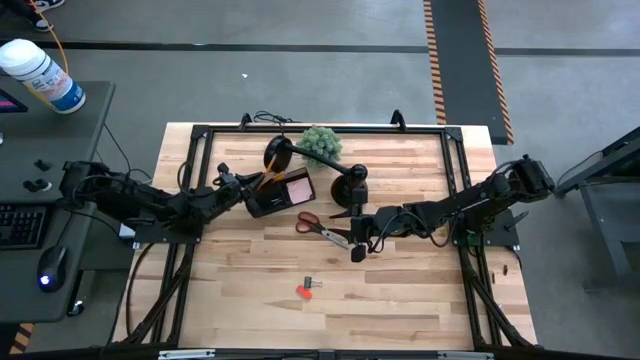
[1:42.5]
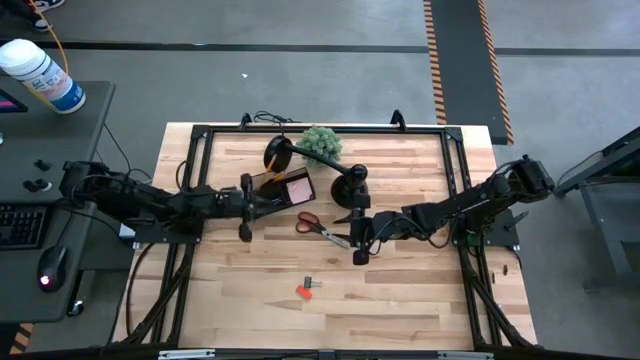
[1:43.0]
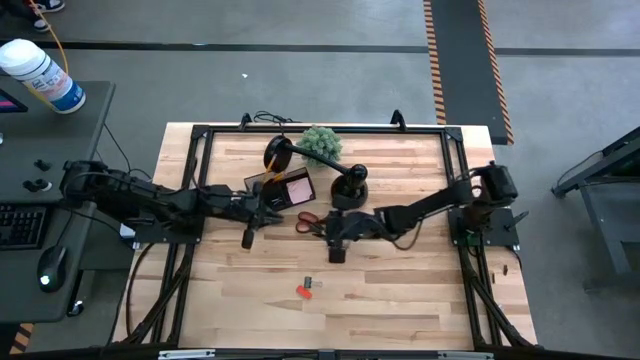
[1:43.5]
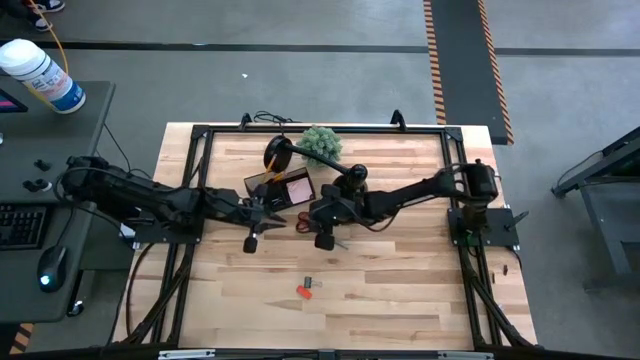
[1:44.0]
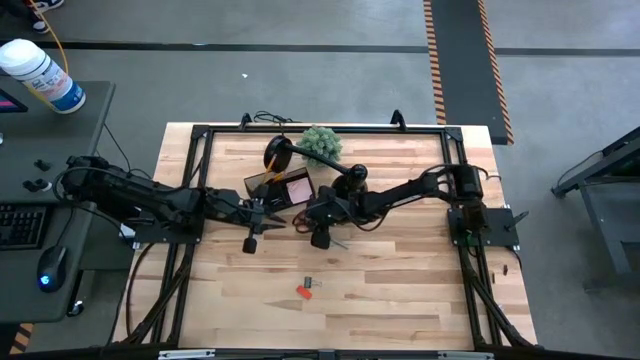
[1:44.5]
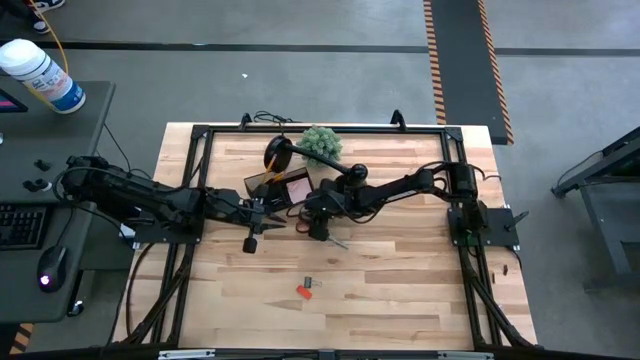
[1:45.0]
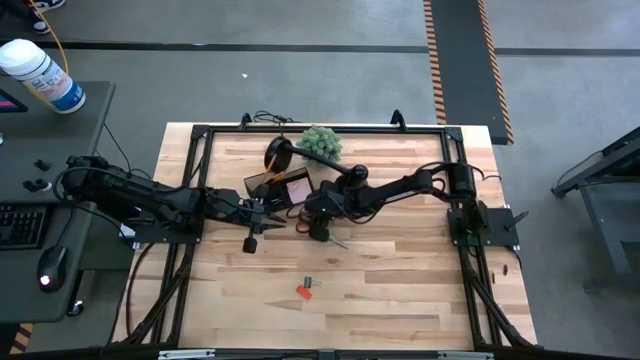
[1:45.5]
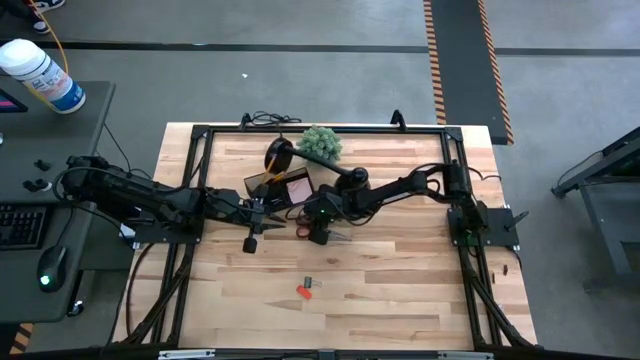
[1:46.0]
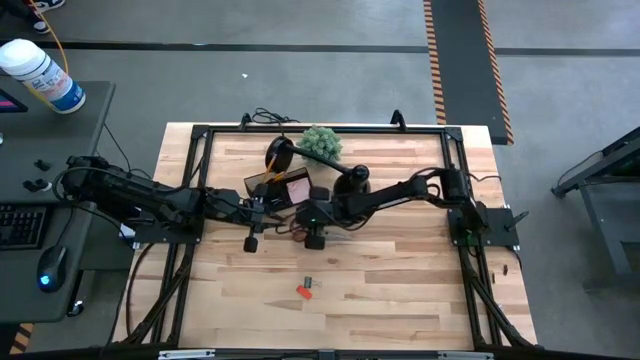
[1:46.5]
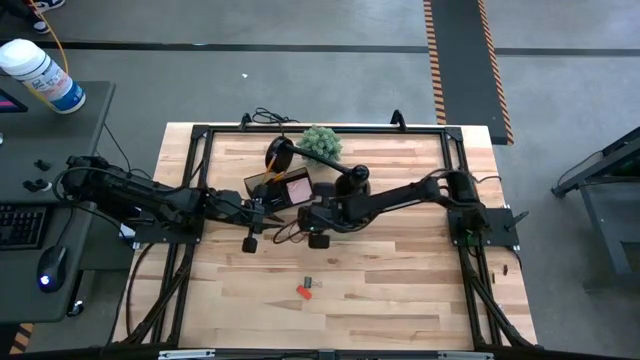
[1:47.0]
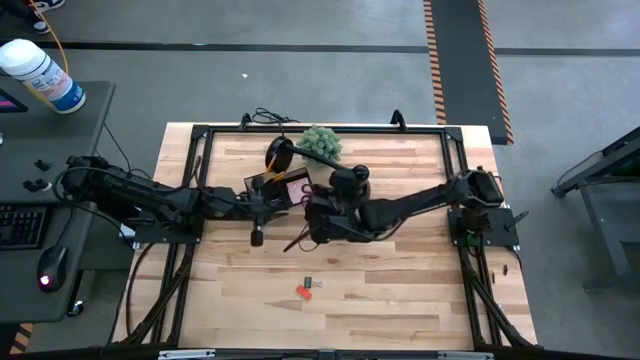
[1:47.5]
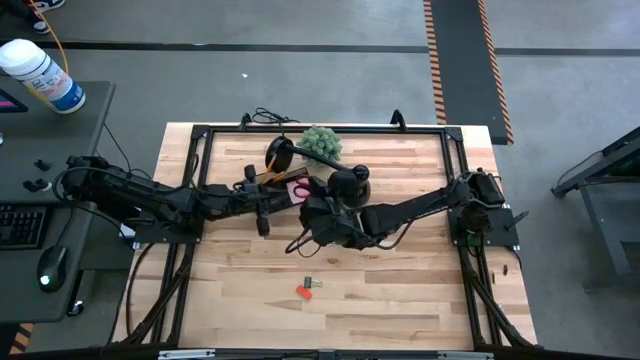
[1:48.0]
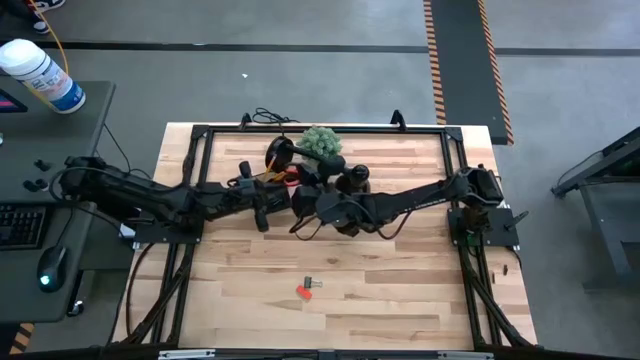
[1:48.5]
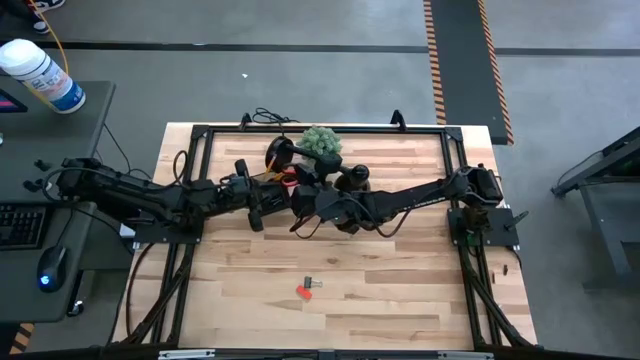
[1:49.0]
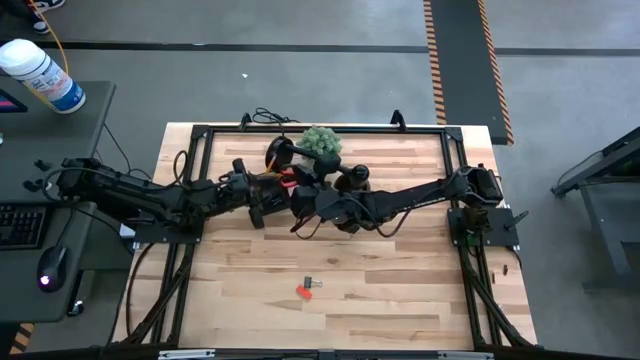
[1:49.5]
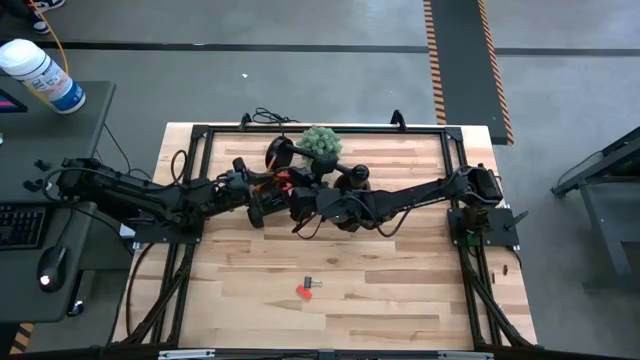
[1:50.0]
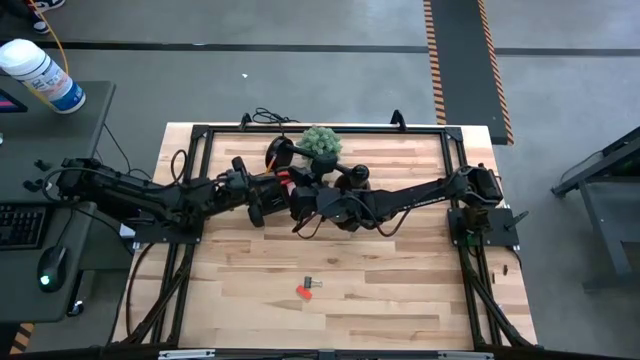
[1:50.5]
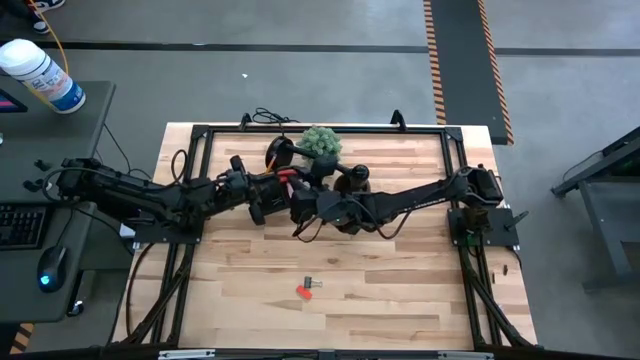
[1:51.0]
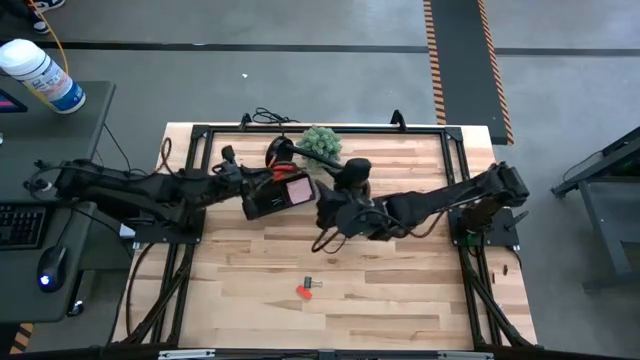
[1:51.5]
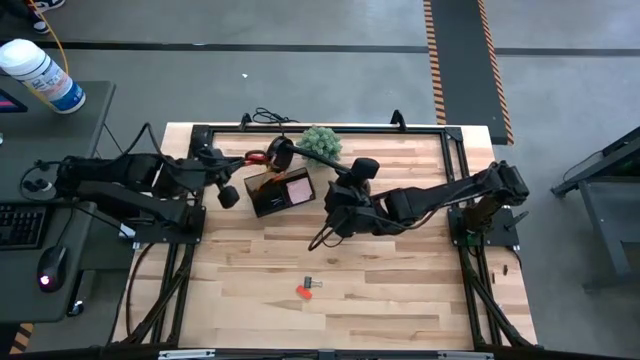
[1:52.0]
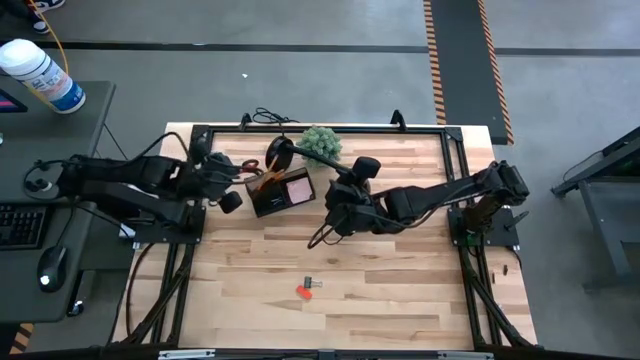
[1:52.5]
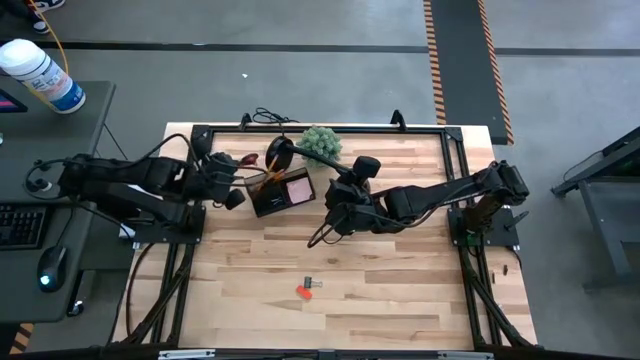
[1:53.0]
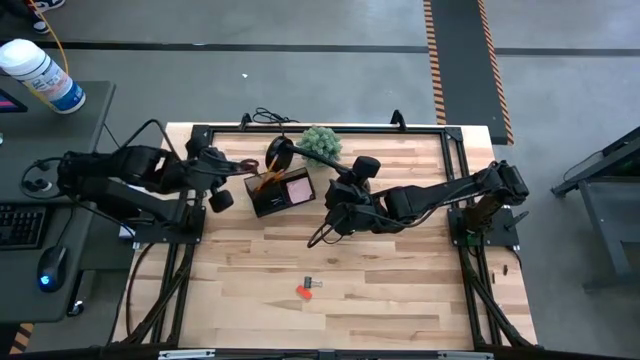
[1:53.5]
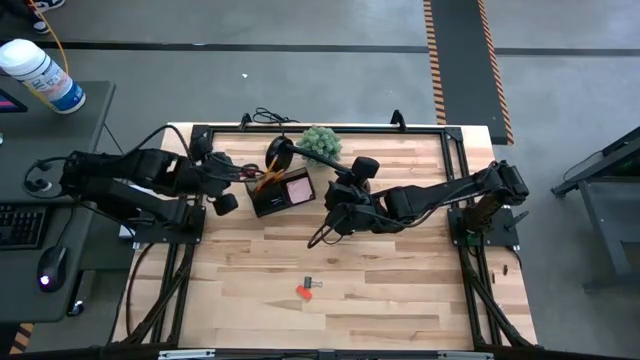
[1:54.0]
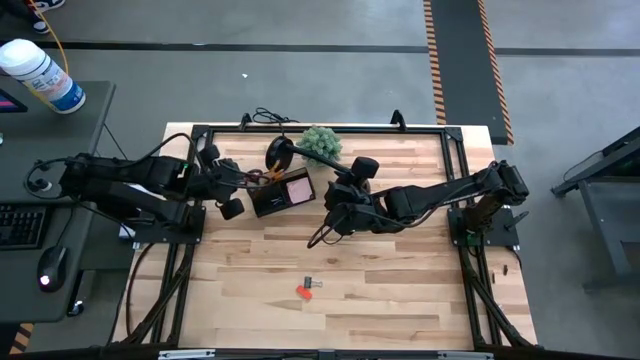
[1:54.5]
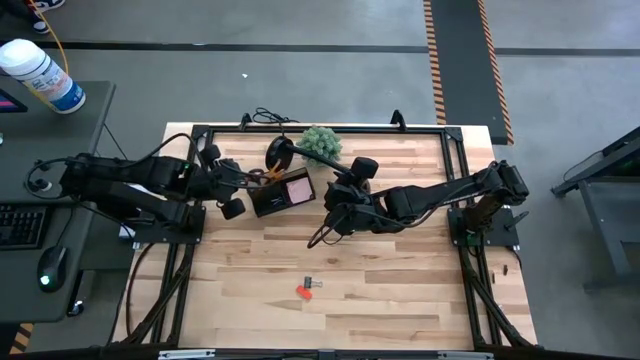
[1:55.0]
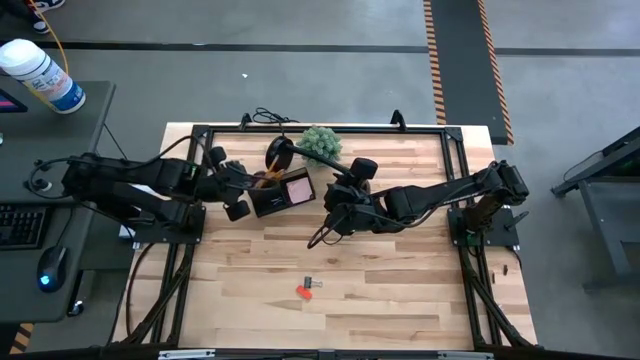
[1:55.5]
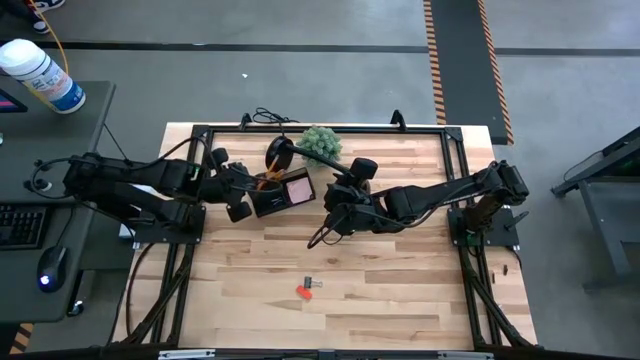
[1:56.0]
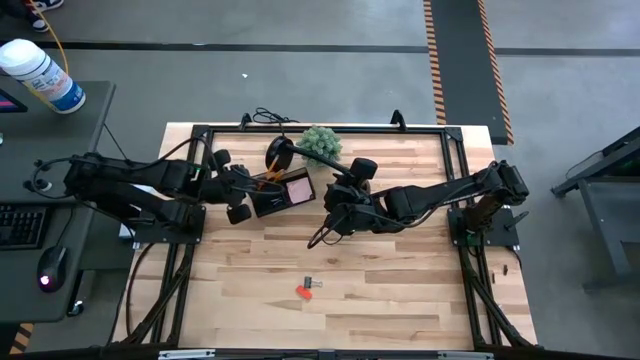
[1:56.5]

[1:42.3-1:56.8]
Task: Pick and place office supplies into organizer
Put the black scissors into the black desk organizer

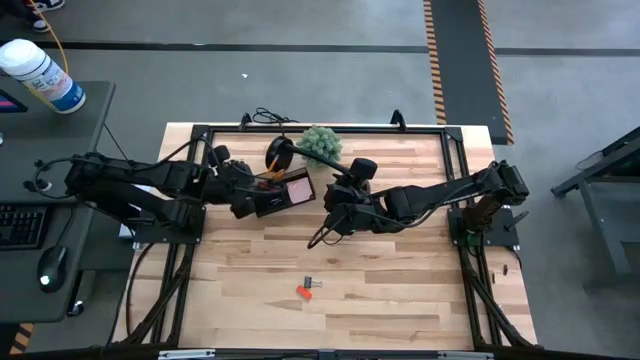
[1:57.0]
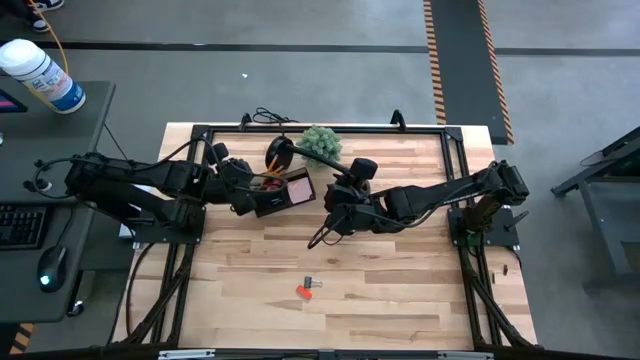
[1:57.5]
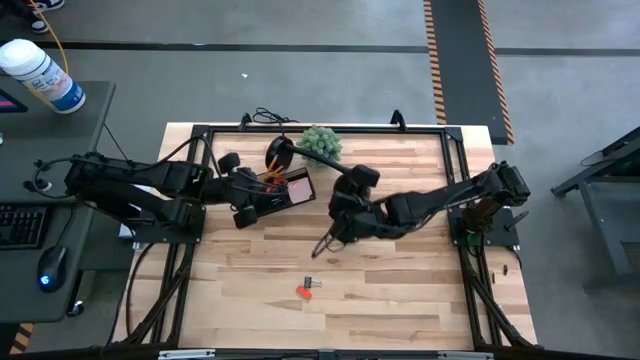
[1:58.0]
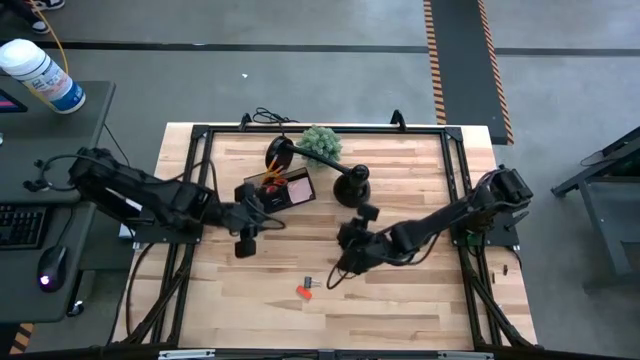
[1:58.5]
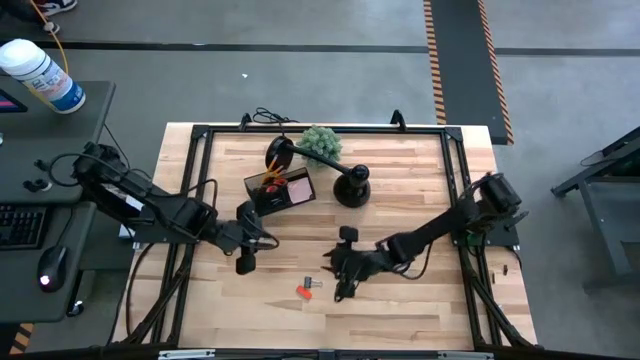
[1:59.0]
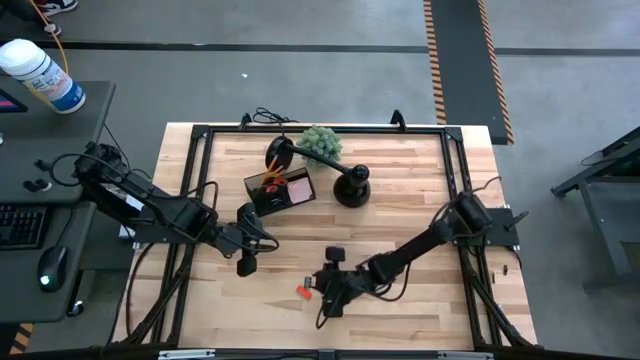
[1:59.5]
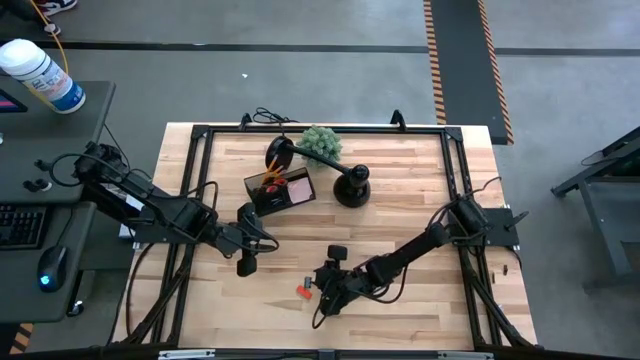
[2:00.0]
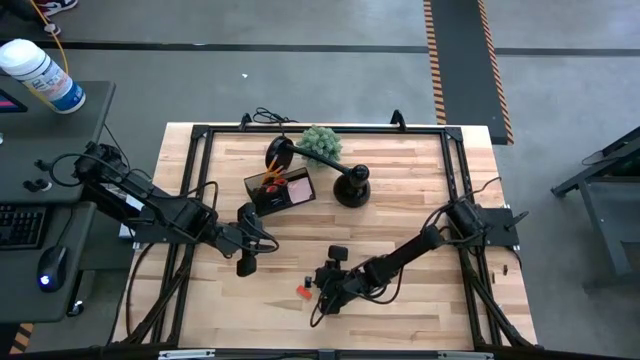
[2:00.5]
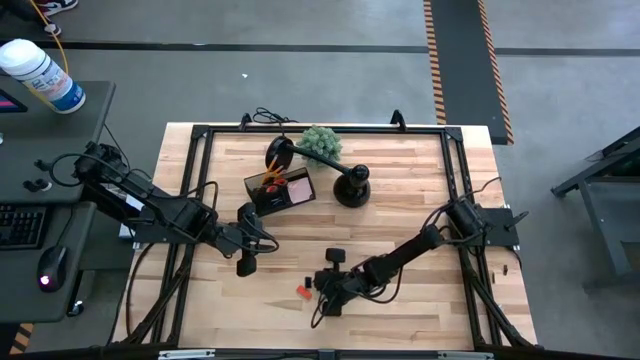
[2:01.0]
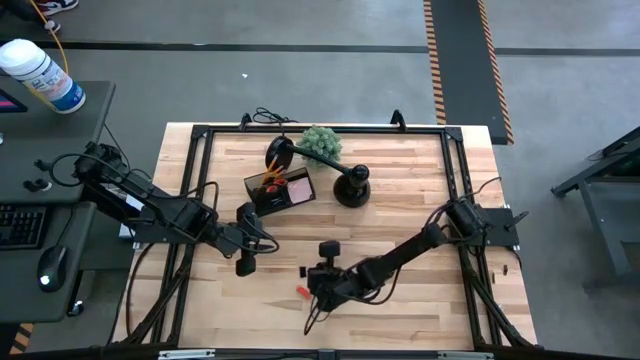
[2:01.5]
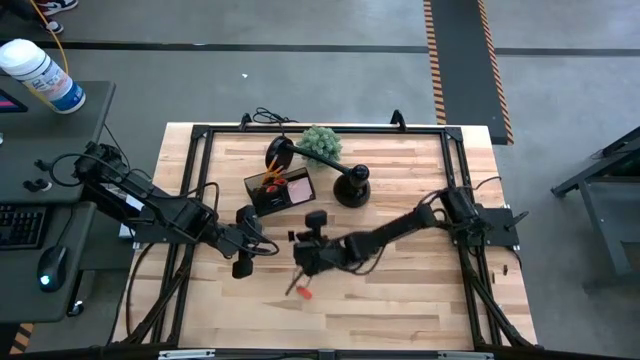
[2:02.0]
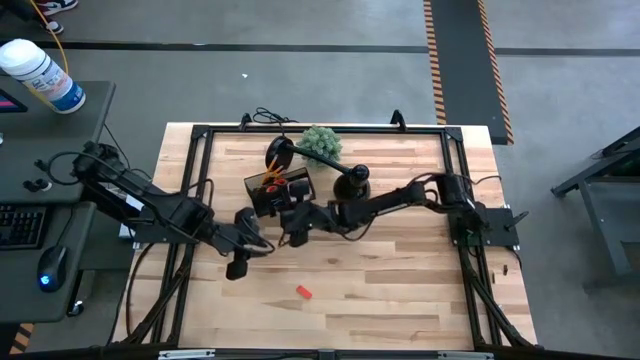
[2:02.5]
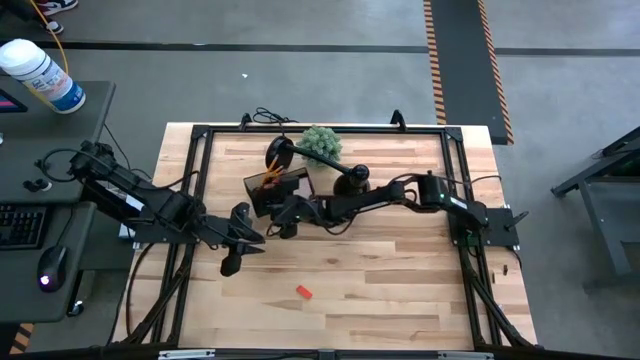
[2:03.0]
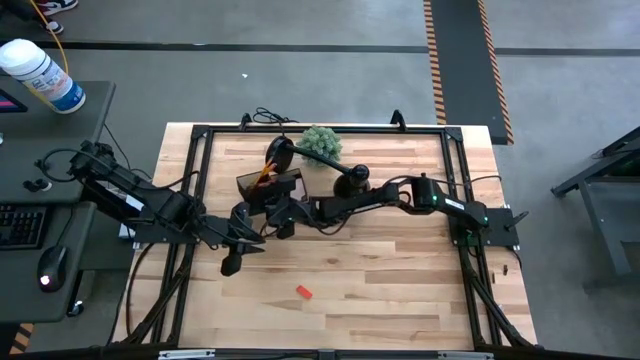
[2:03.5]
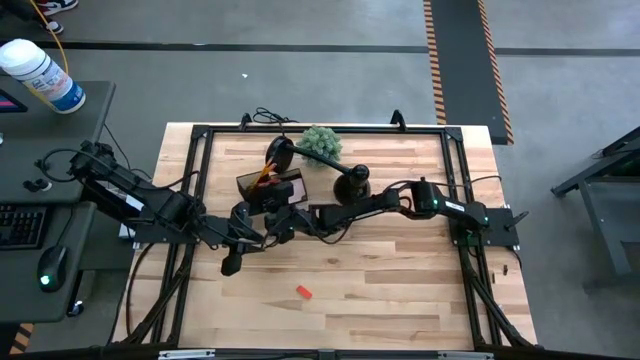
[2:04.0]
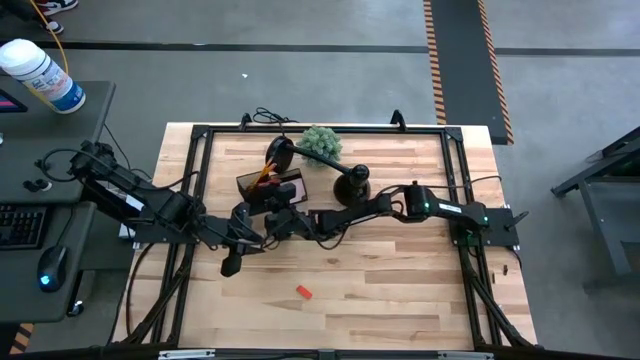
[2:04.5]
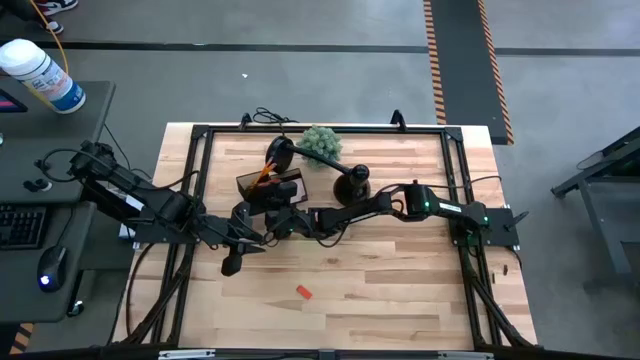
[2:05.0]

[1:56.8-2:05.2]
Put the black binder clip into the black desk organizer
